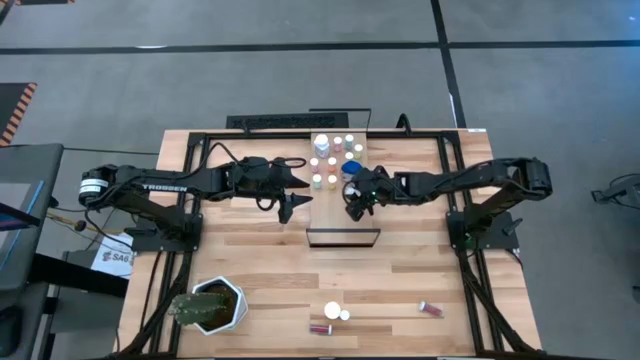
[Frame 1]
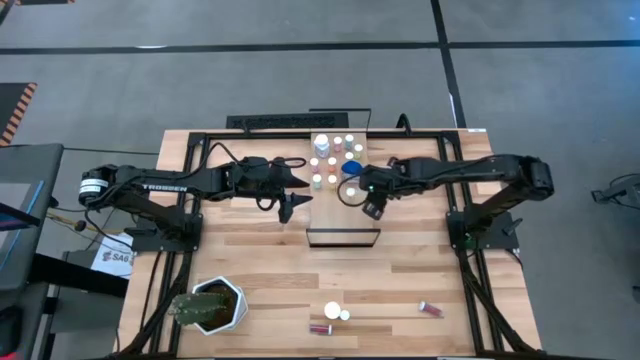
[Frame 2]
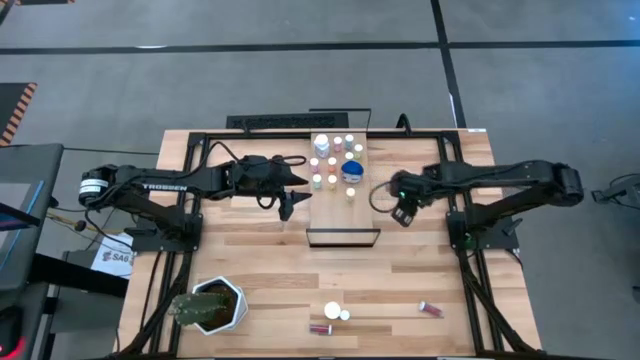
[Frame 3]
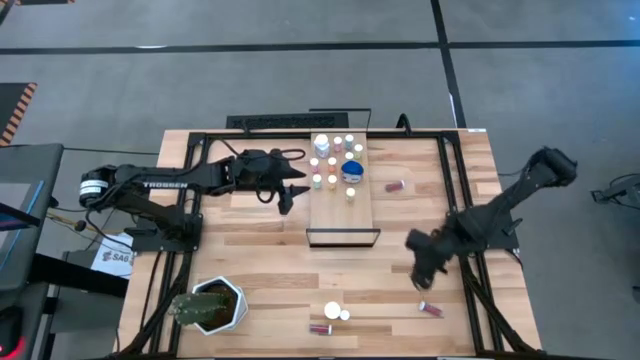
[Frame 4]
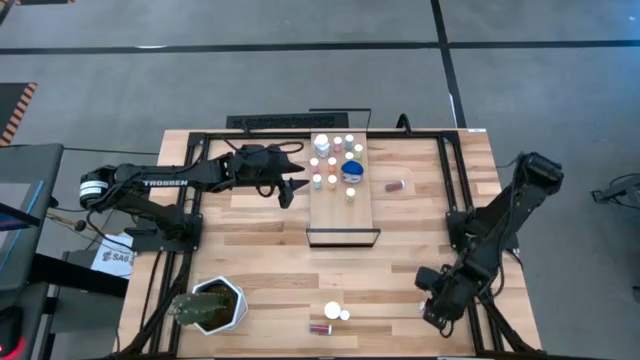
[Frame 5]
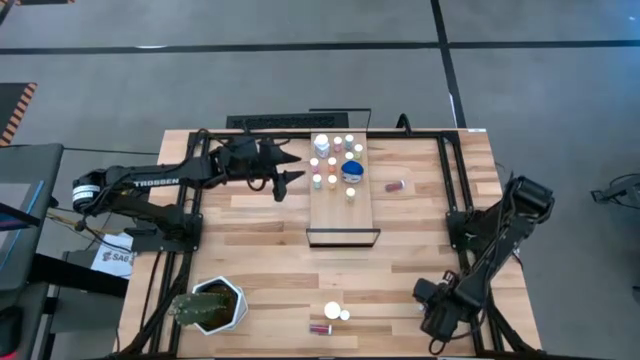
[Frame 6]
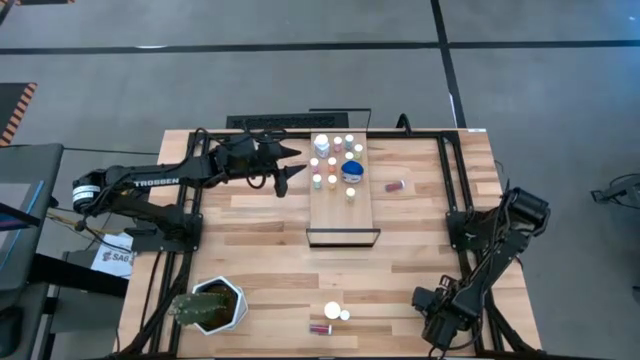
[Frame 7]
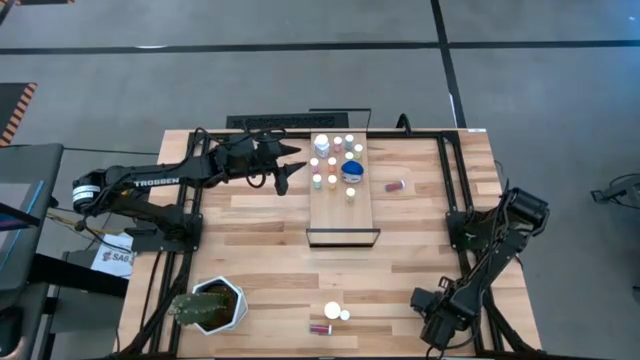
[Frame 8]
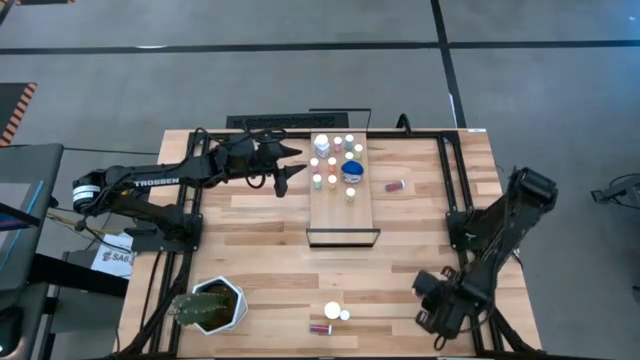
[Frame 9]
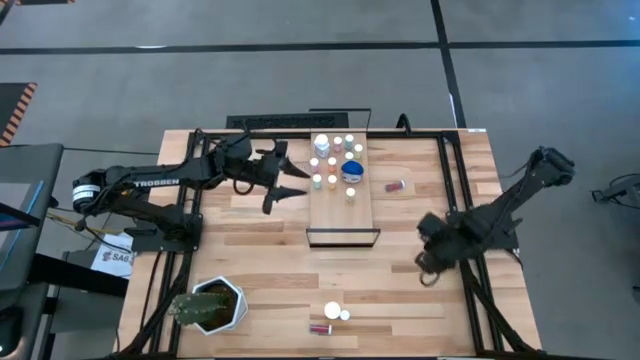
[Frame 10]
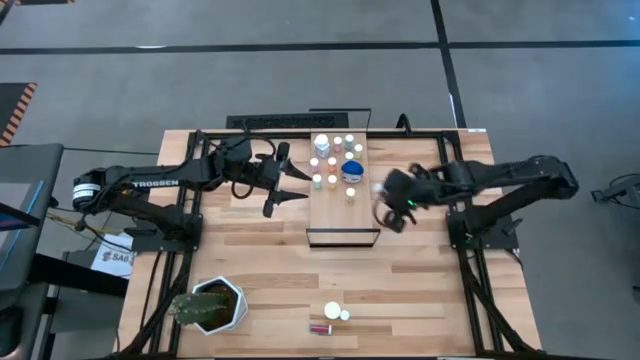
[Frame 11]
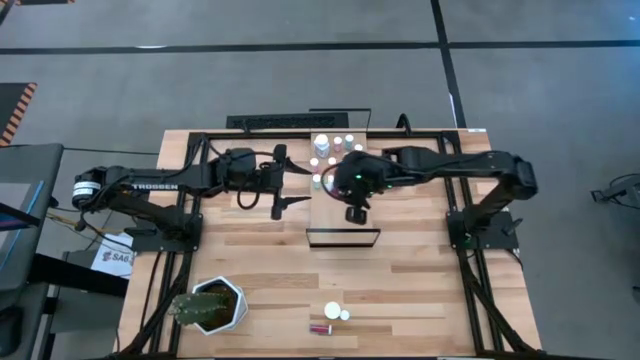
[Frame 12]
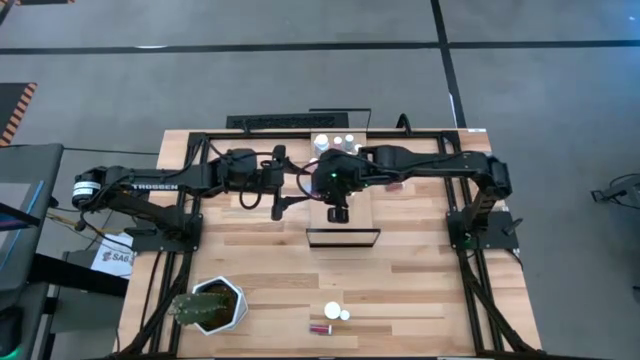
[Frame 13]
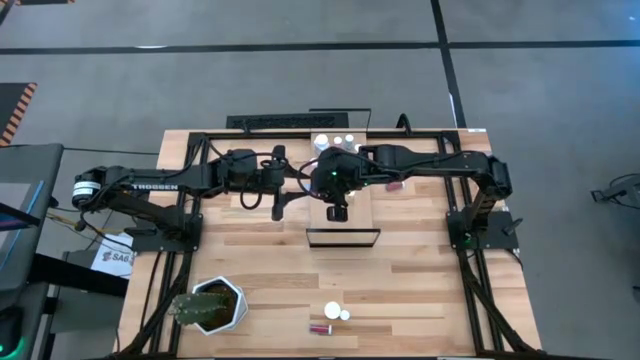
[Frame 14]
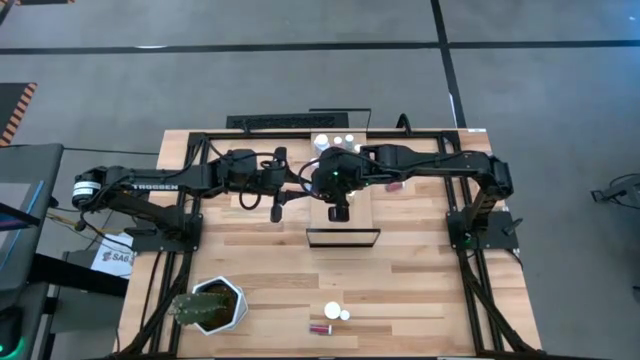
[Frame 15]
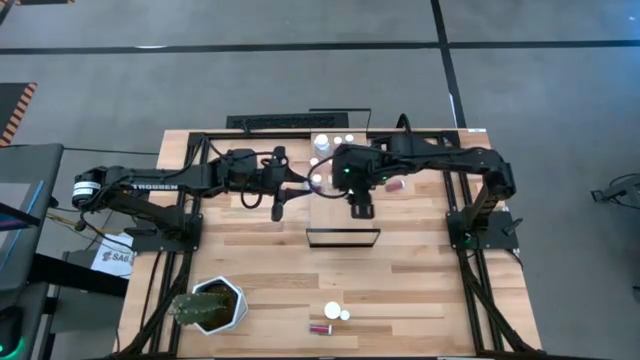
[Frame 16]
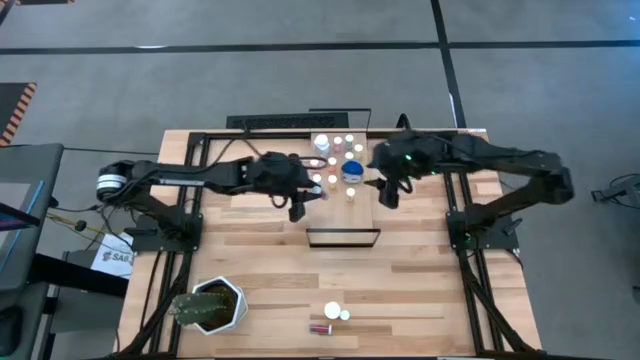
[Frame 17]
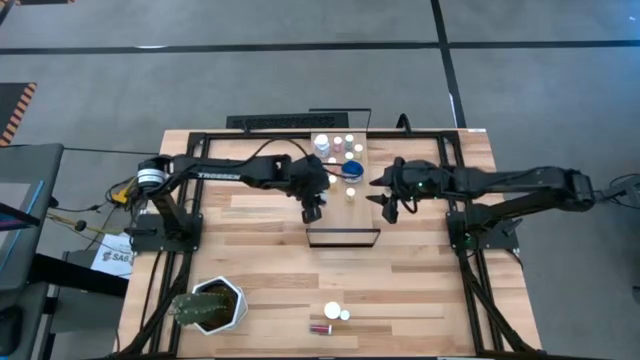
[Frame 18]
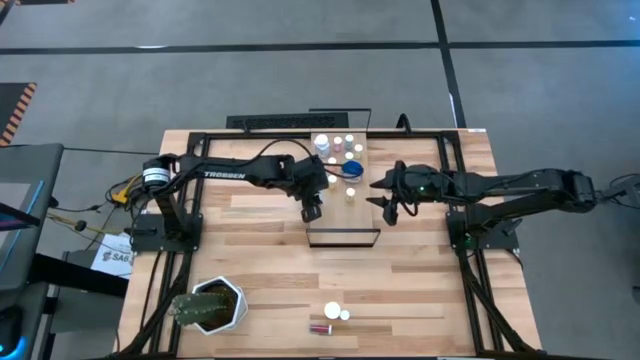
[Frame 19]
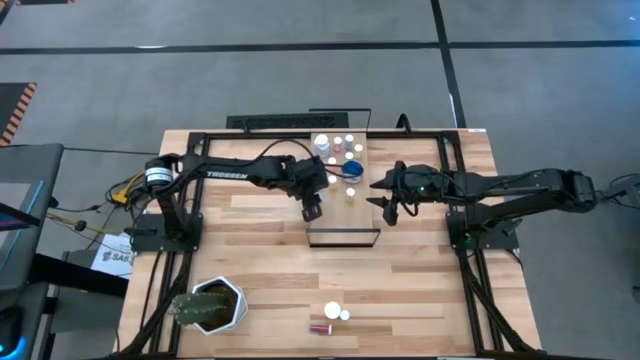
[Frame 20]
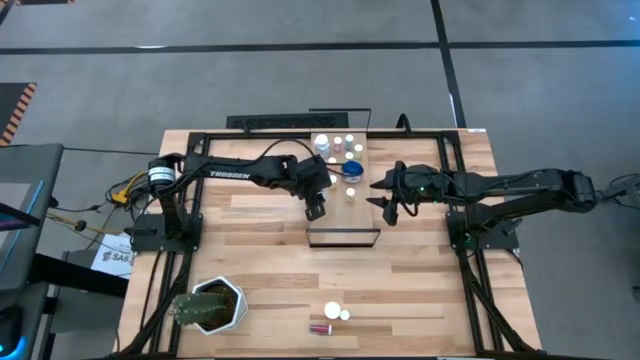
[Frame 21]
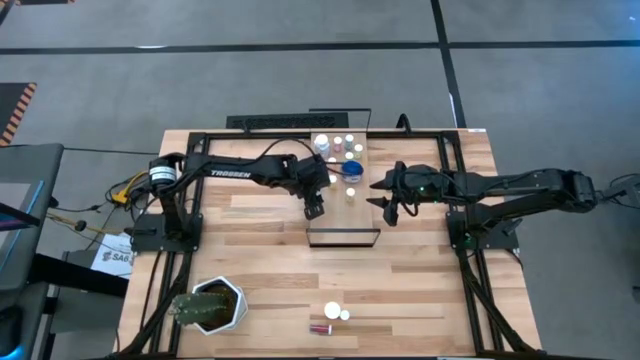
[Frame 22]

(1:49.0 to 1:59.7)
Task: Pick and place medicine bottles onto shelf by color
Put the light blue pill bottle on the shelf

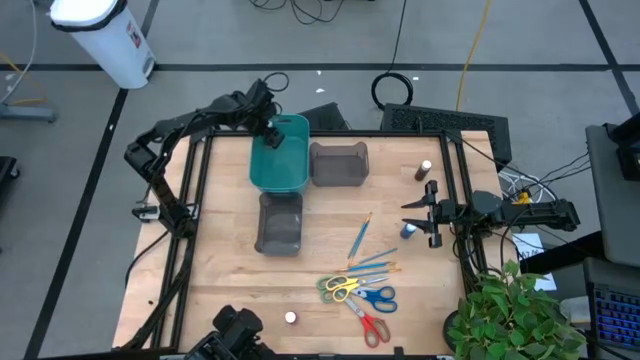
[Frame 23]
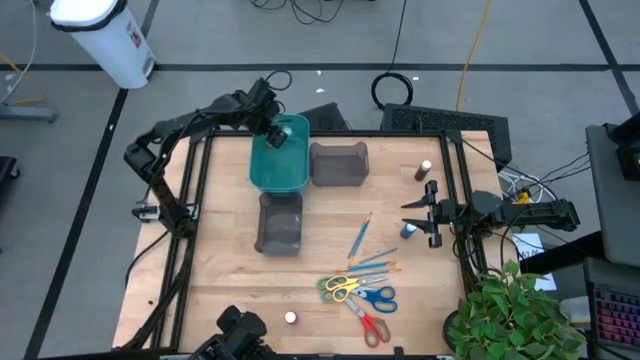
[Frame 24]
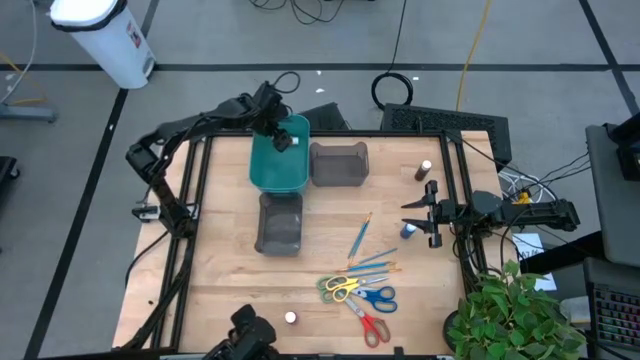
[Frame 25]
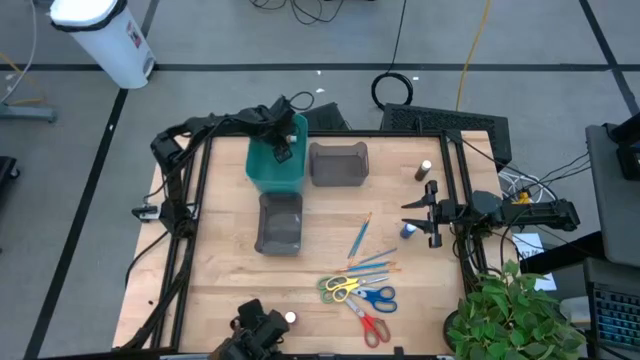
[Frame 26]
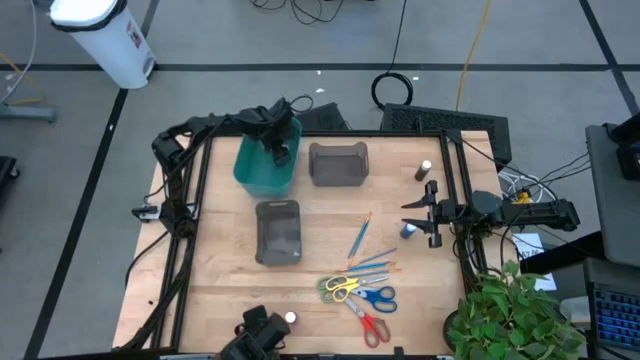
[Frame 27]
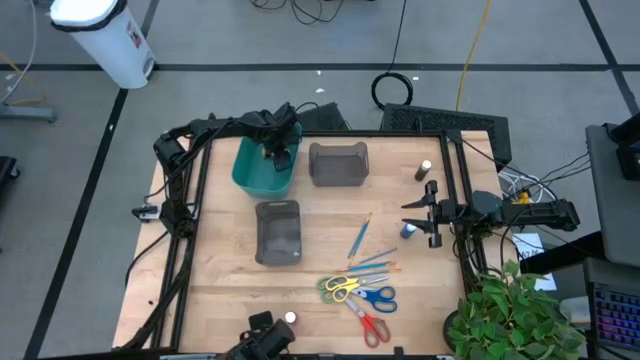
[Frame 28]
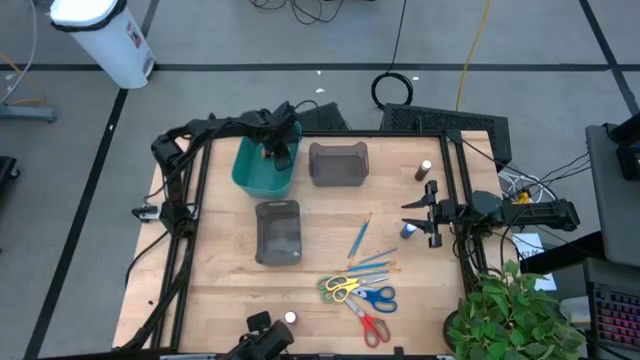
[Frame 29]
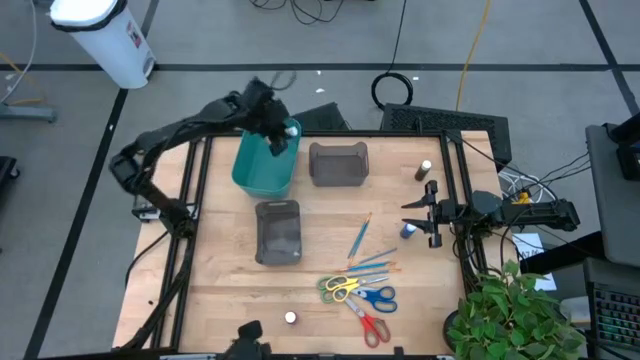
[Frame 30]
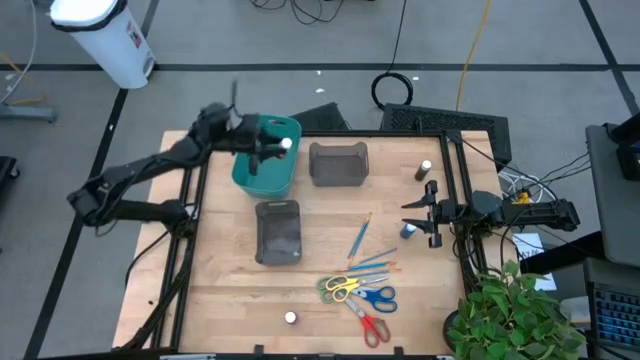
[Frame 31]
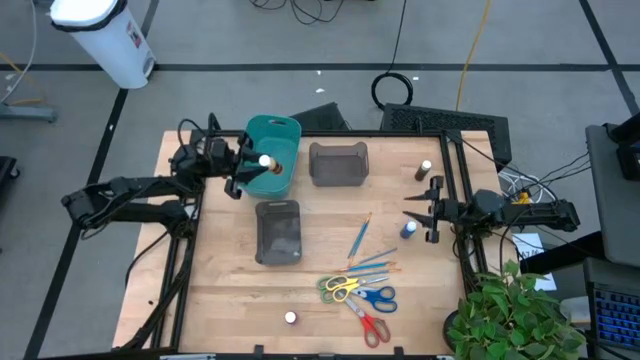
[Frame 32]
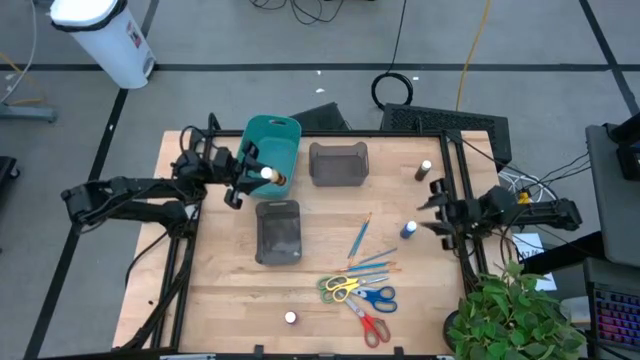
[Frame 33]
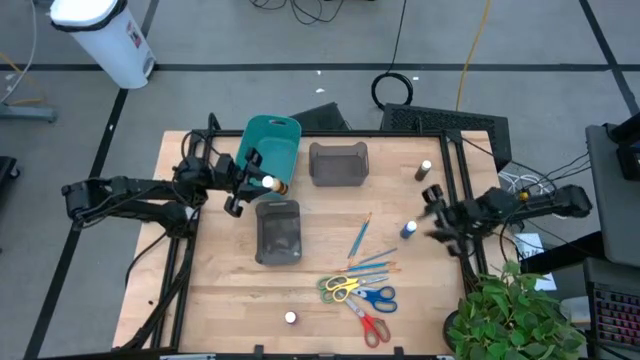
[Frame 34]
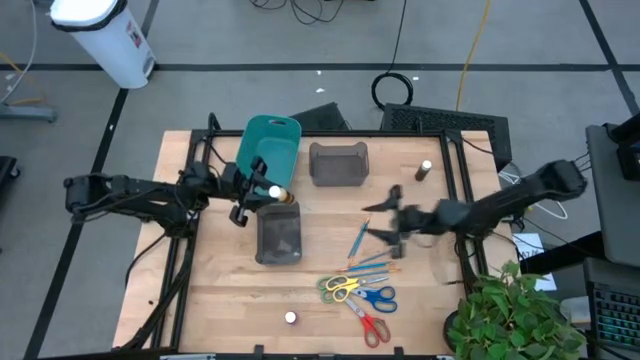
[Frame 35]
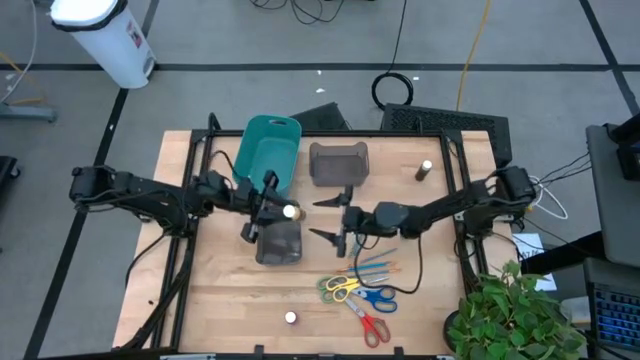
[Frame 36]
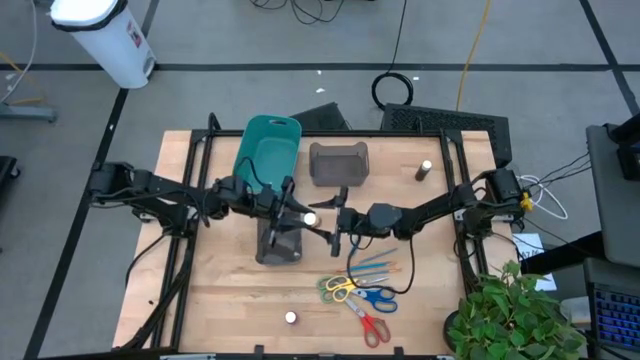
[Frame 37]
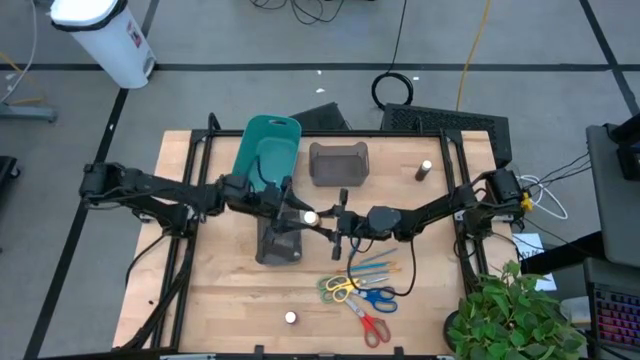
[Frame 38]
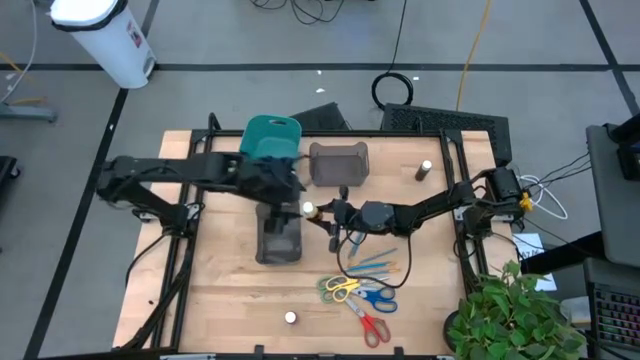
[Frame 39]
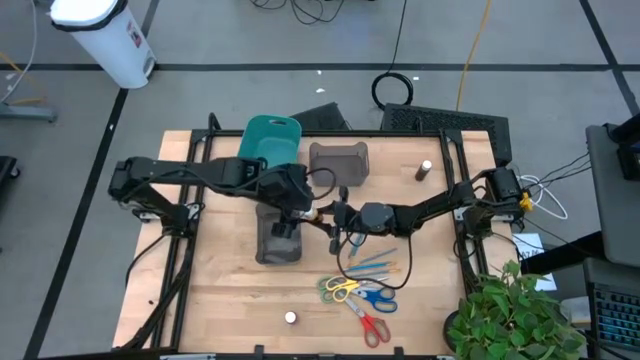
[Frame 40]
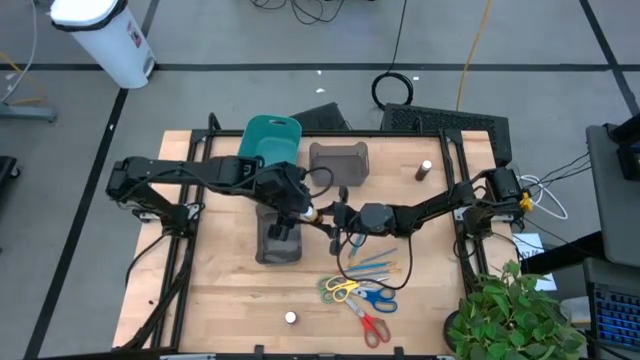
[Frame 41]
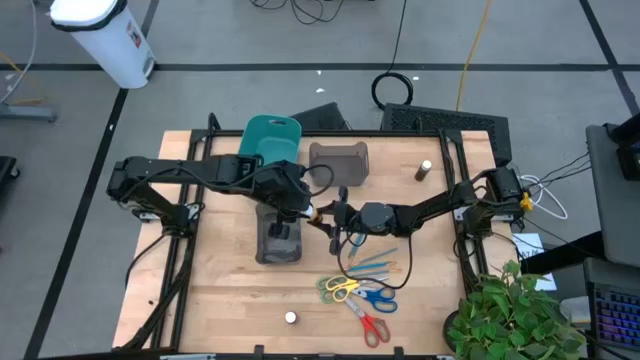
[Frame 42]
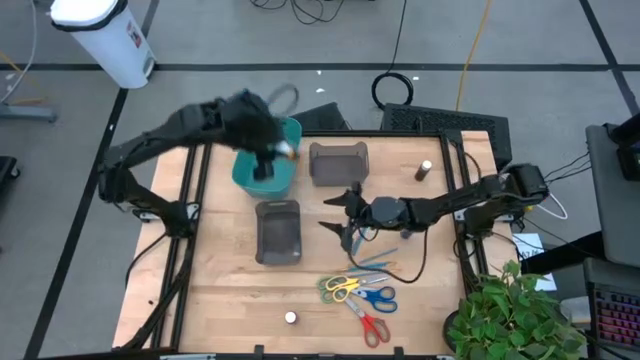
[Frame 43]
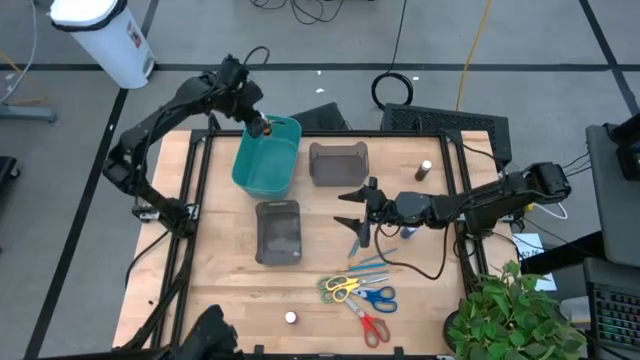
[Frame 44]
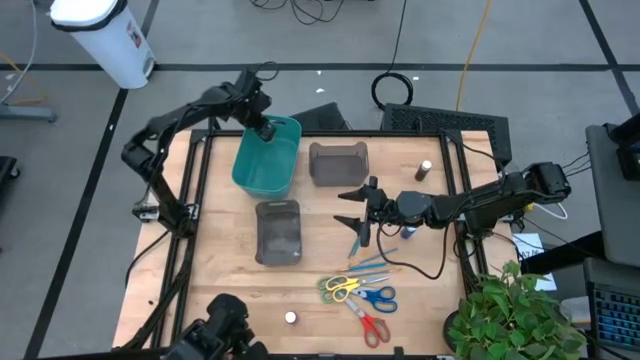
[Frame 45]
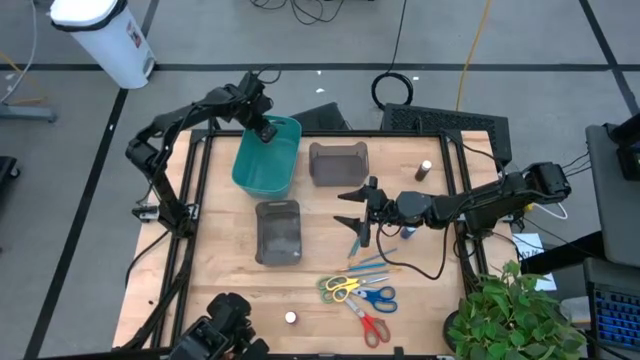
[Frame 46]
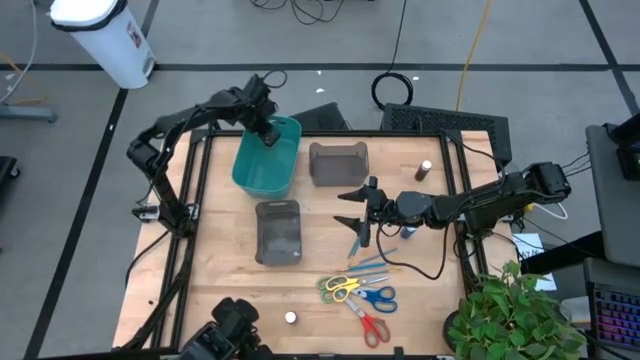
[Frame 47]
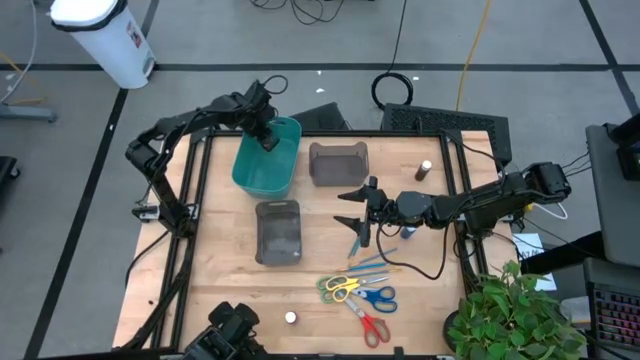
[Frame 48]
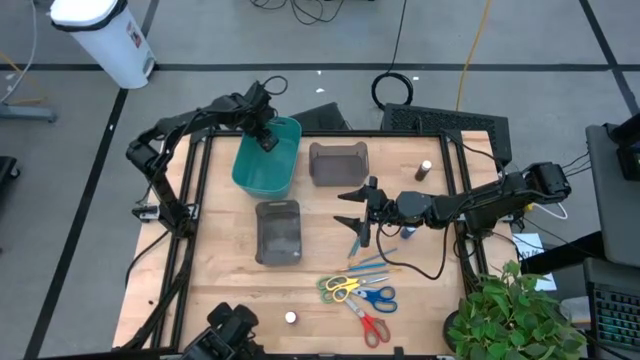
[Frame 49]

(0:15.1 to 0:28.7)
Task: Pick & Place Paint Supplies
Put the yellow paint bottle into the blue bin
